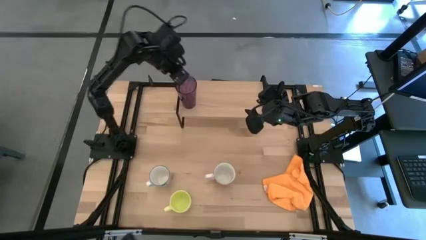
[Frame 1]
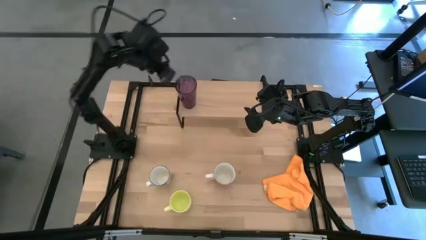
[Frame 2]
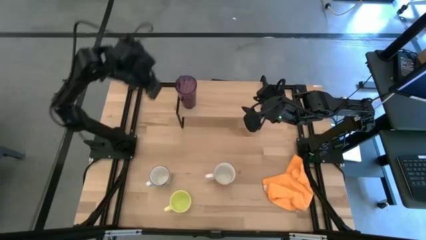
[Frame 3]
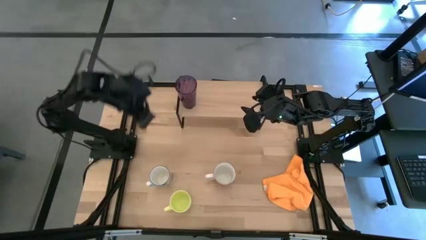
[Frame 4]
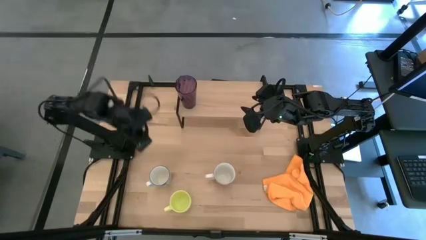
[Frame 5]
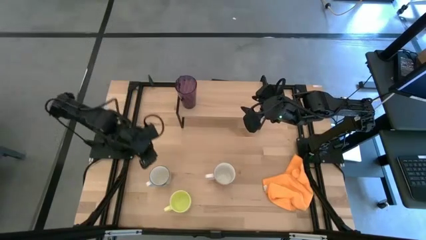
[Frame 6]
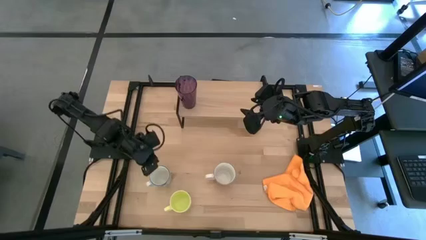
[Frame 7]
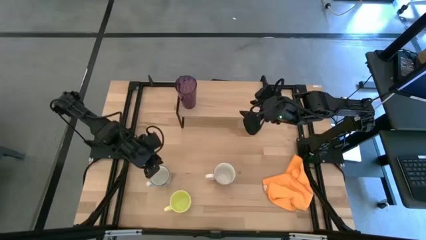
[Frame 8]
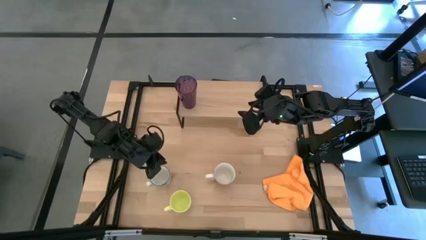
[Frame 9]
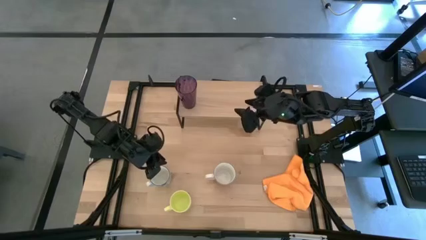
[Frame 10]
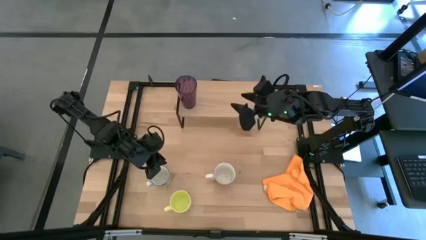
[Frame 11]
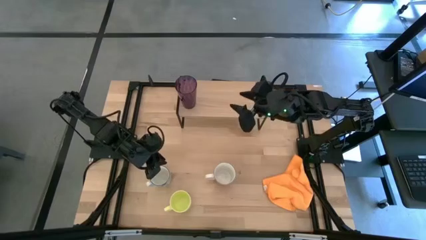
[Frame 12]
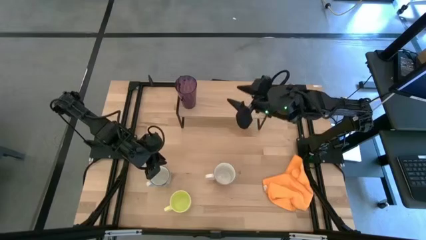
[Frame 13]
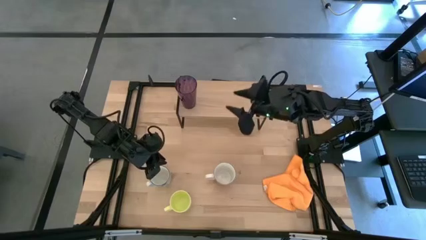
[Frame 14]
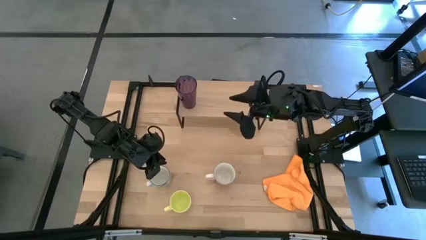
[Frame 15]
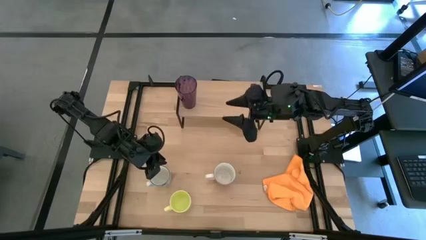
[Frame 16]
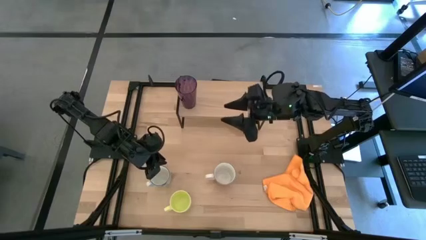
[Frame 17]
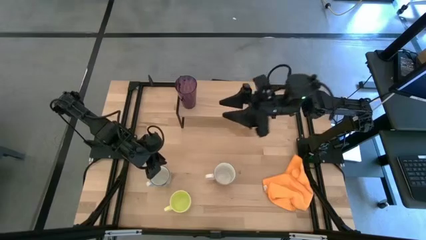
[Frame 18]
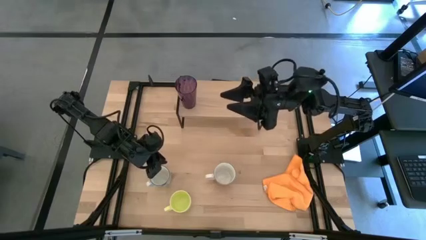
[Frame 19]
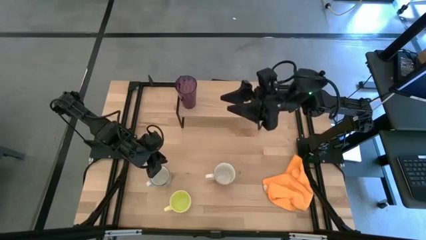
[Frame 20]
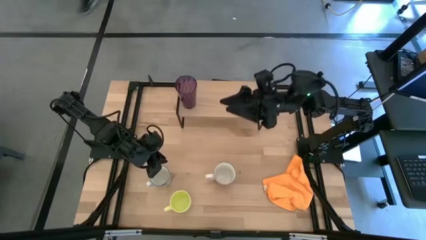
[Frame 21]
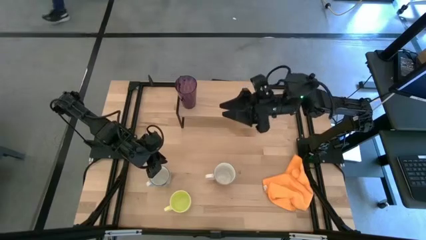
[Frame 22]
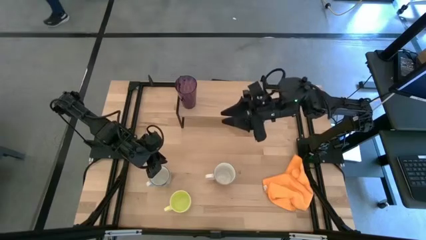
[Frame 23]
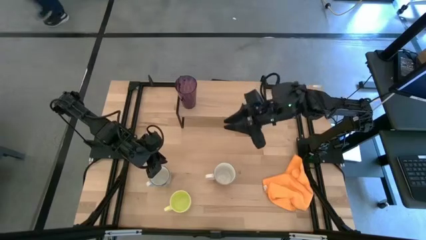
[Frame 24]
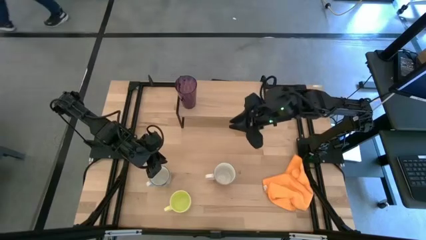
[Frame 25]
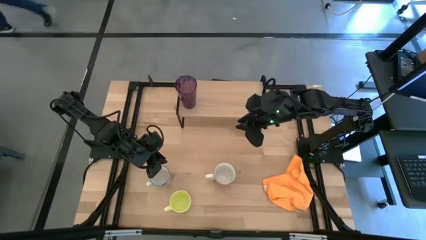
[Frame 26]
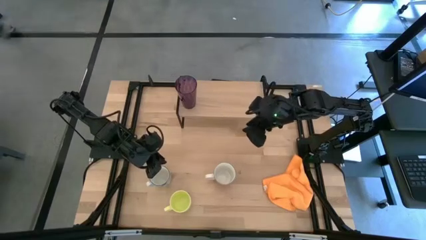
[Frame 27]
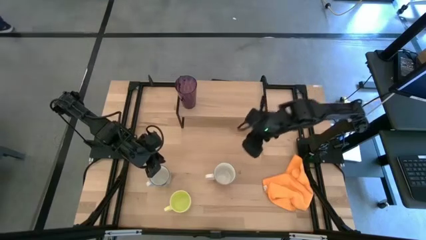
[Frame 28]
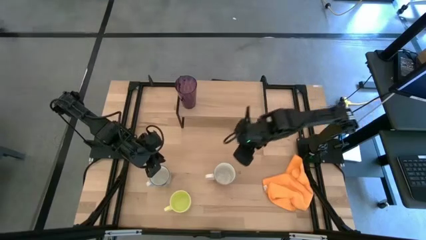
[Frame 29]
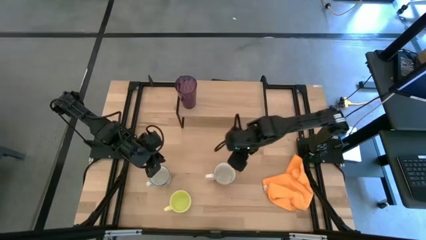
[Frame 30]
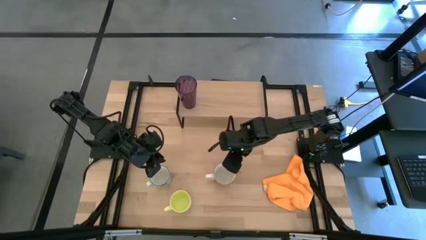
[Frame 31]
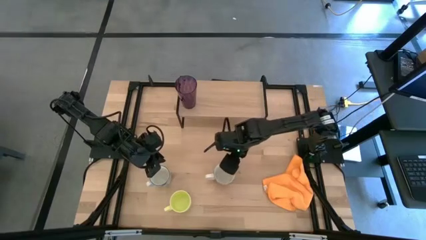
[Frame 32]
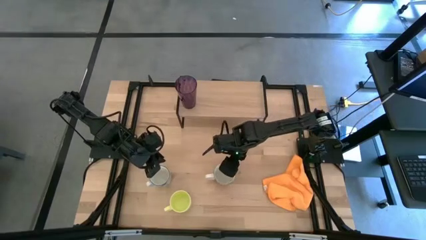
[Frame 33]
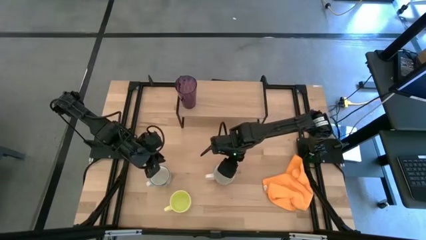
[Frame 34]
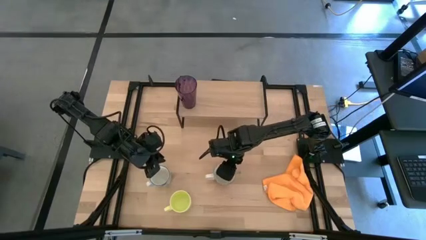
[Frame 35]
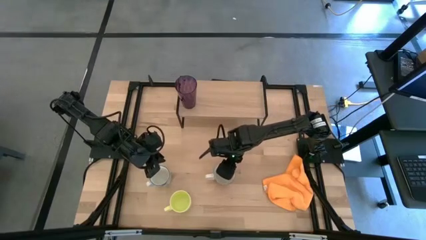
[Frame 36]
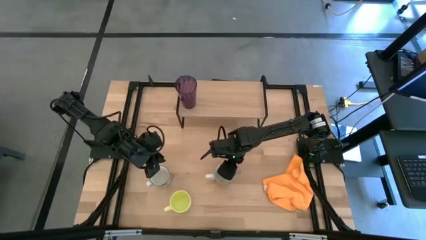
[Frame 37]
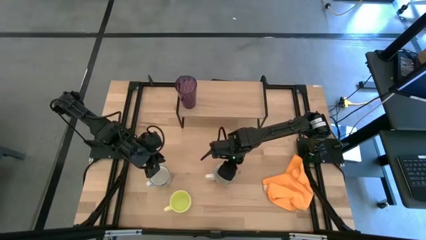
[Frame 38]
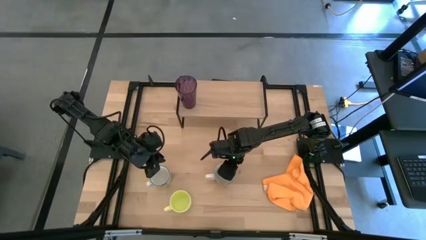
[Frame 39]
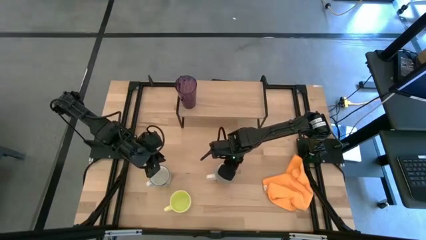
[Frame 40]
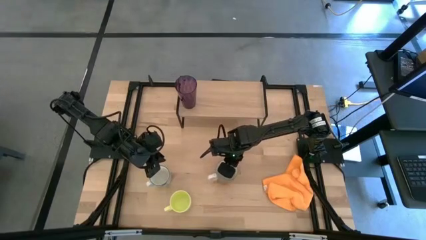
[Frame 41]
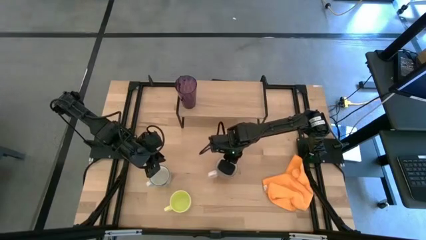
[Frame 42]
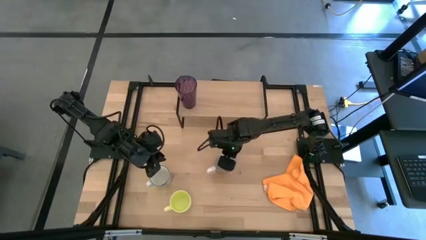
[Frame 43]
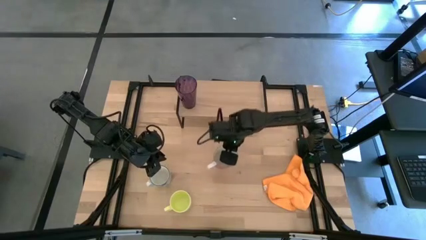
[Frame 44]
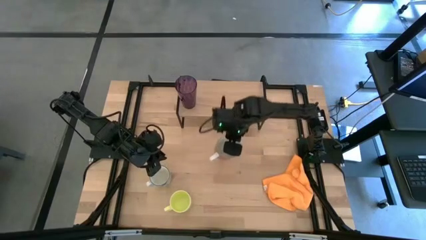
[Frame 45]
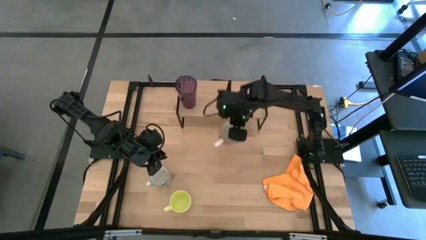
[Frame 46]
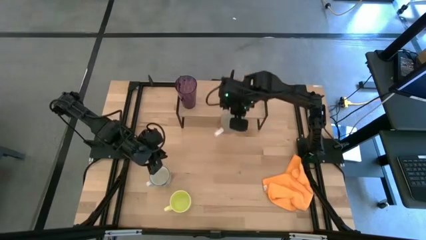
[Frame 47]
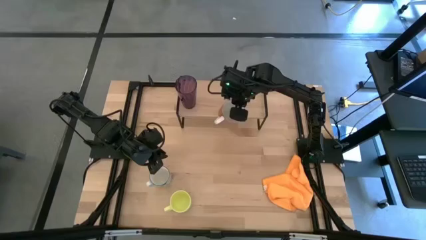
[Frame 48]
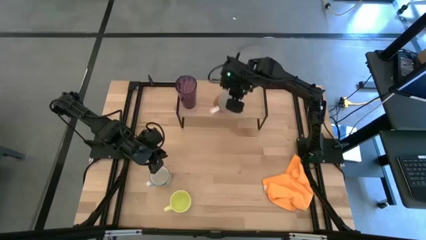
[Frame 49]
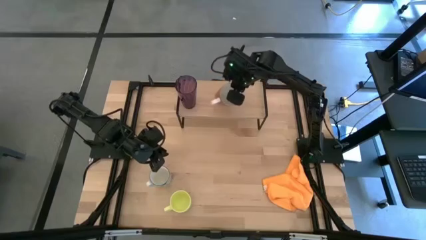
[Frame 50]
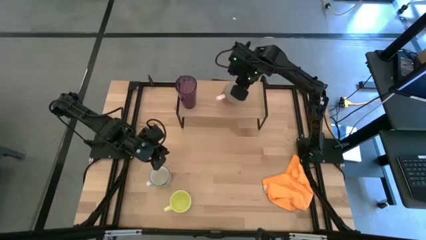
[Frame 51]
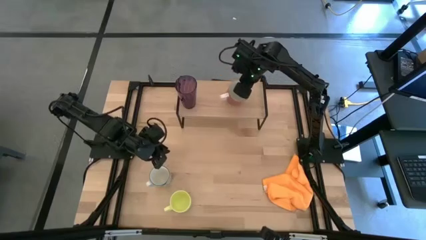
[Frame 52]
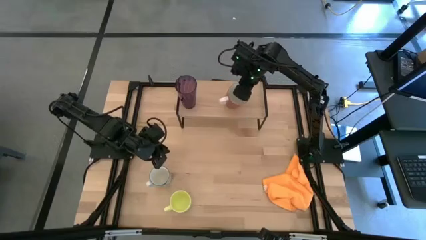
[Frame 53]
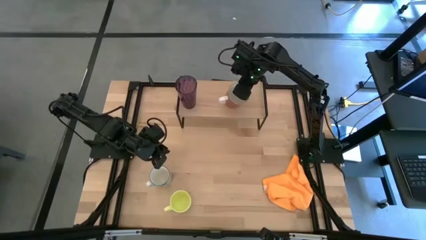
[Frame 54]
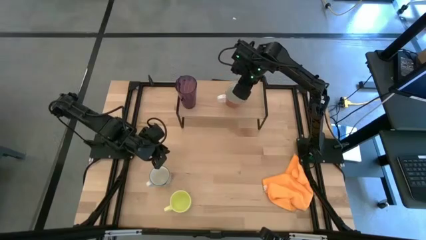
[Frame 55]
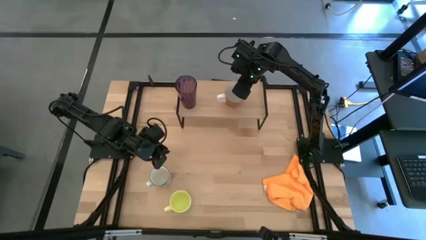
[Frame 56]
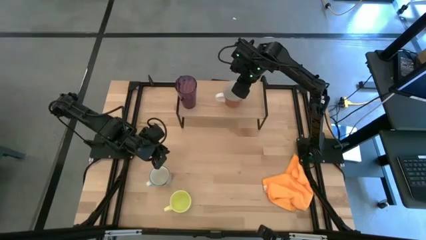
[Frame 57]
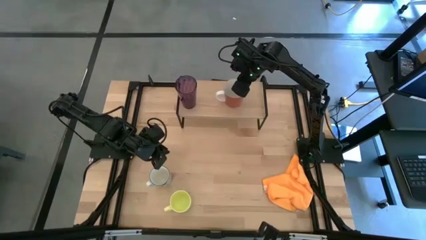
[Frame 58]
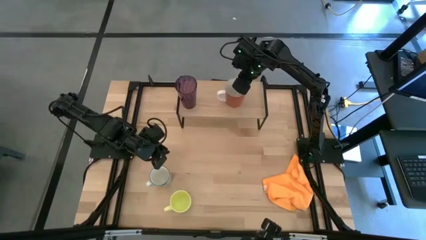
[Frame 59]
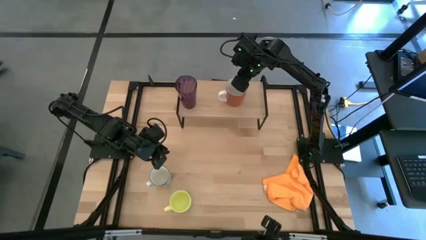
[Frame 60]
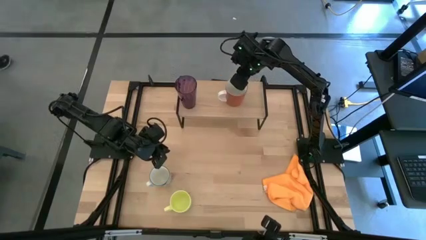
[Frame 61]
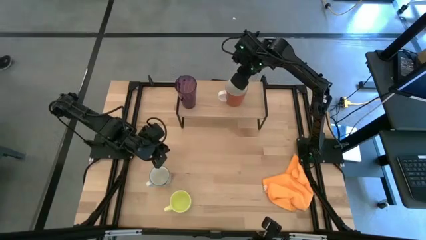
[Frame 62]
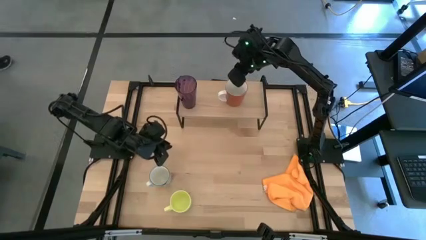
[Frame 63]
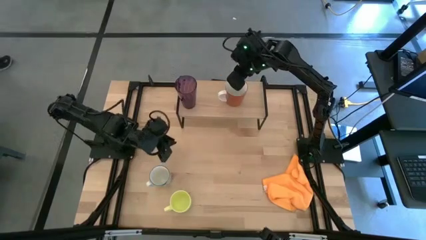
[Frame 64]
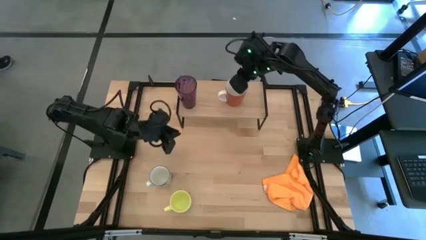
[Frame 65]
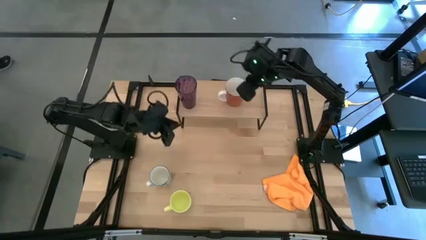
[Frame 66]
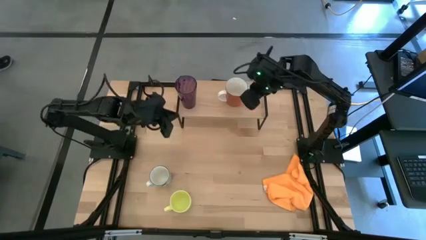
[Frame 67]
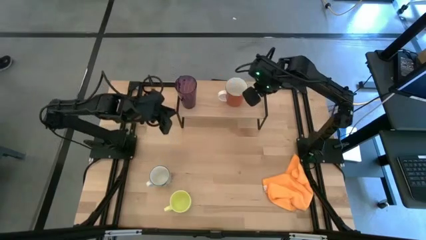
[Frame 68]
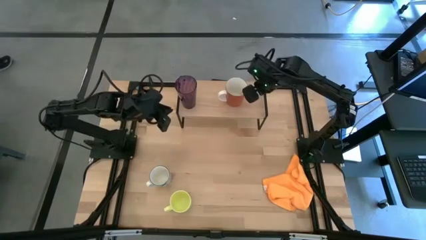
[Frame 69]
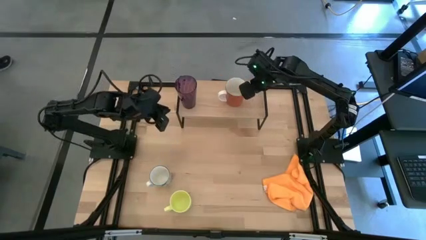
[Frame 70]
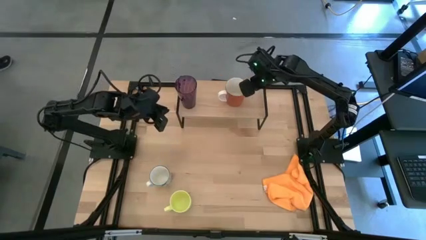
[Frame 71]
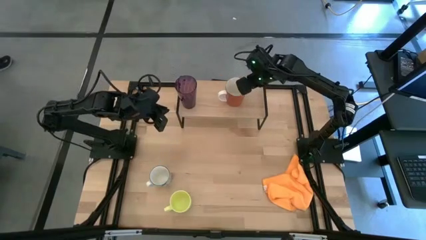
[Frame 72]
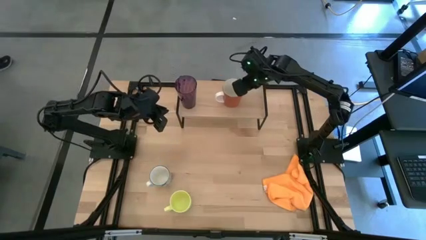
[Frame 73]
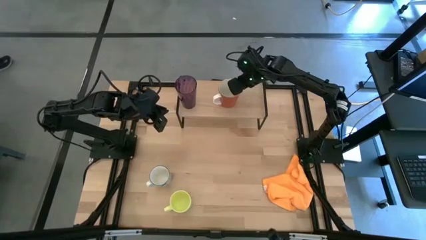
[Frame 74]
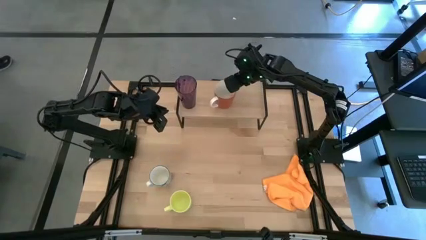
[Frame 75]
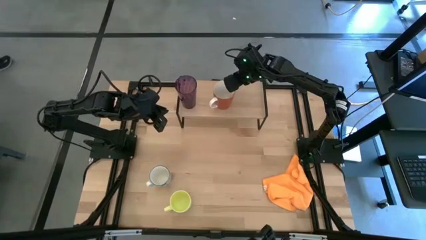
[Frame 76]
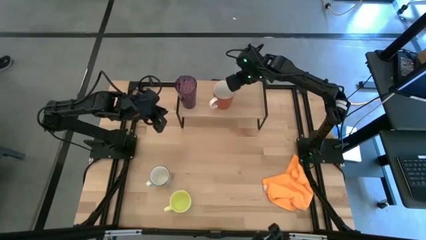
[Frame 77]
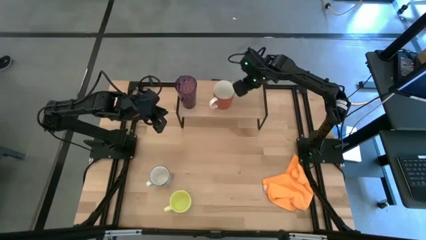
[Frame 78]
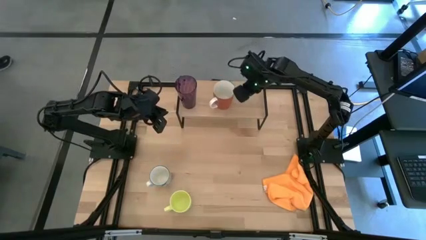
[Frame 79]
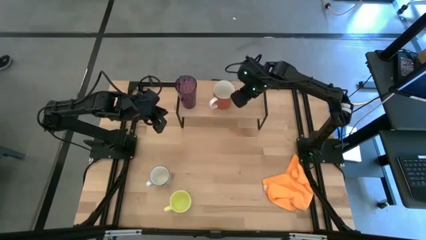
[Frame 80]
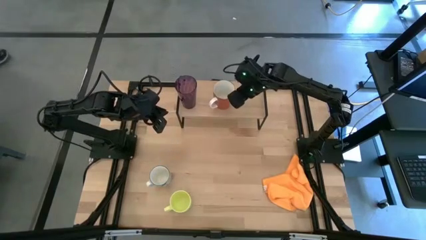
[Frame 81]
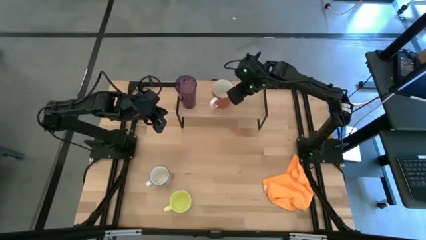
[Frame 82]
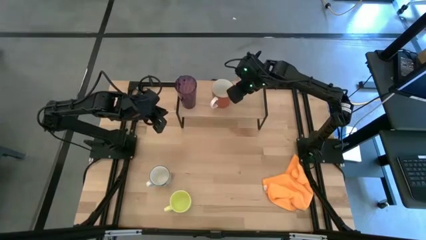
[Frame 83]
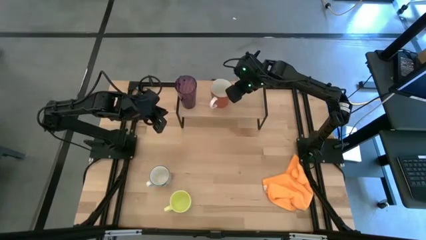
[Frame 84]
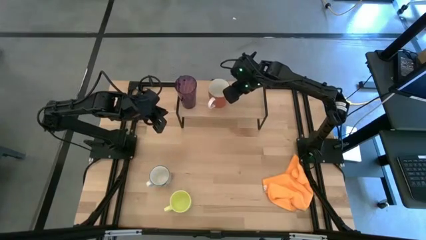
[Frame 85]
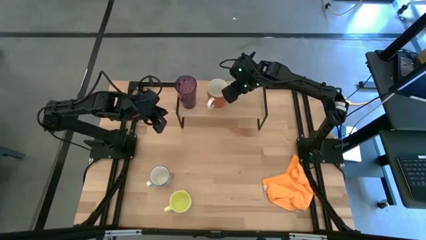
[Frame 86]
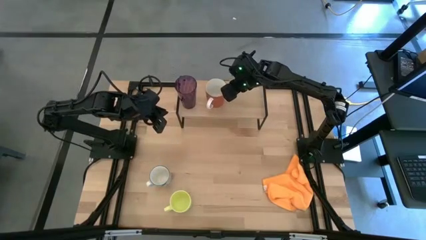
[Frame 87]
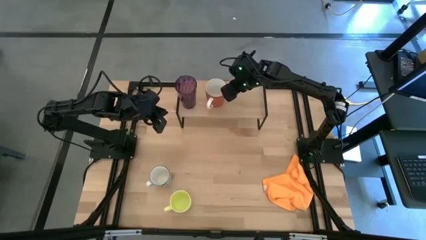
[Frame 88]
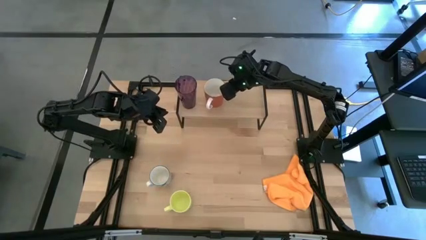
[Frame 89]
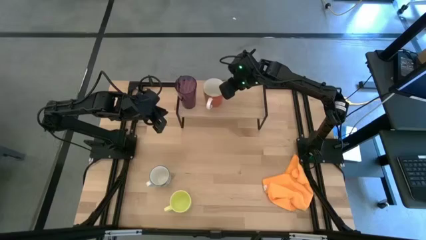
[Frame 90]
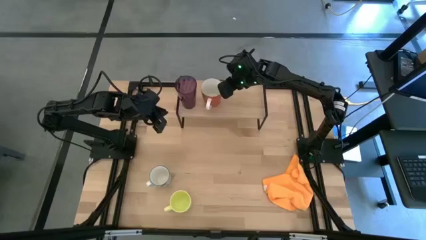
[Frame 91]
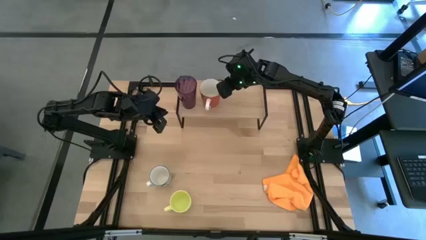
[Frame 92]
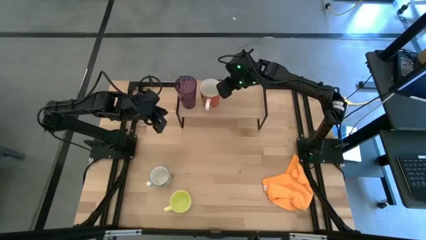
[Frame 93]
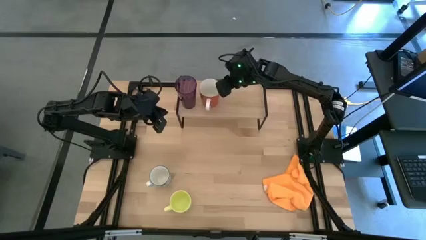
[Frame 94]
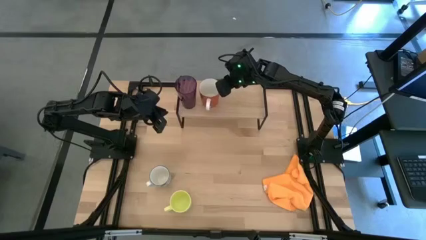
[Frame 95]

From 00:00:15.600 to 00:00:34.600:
Task: Stack small to large cups/mugs on shelf
Put the orange mug on the shelf
